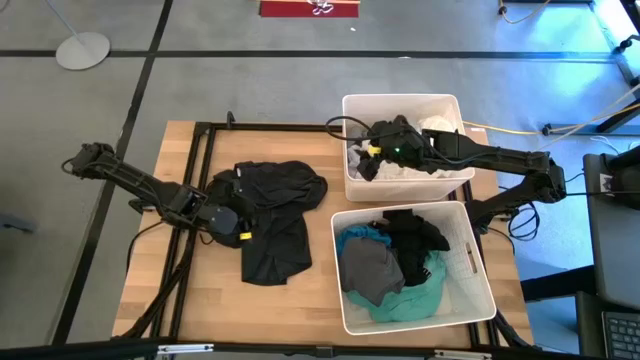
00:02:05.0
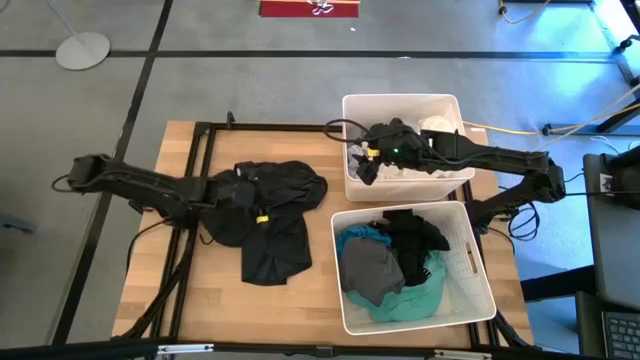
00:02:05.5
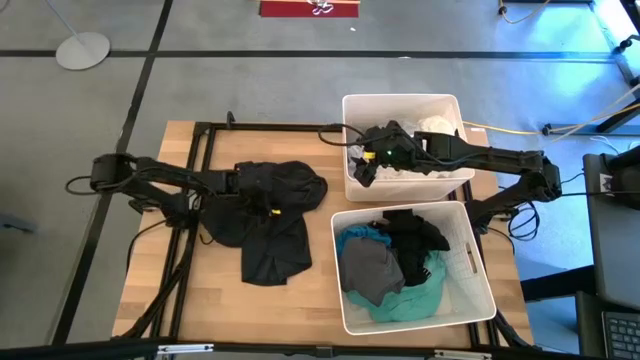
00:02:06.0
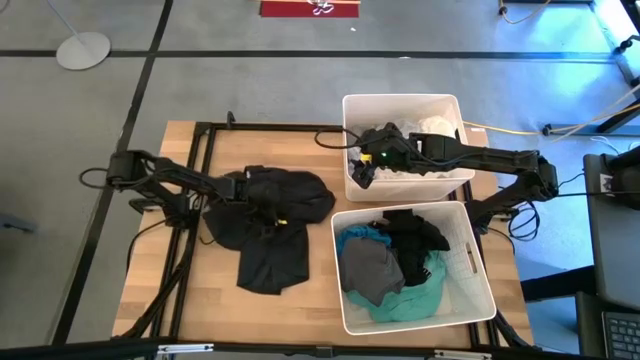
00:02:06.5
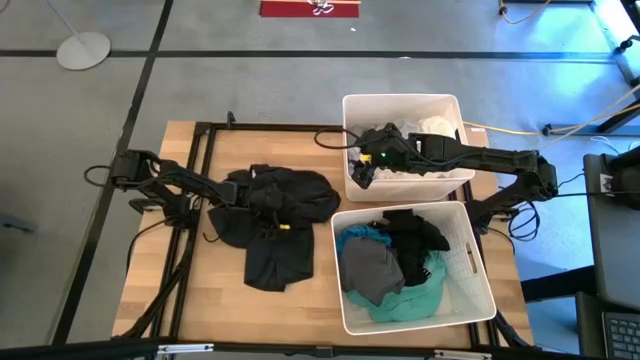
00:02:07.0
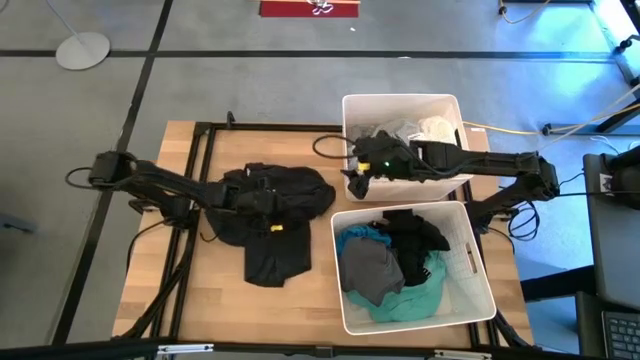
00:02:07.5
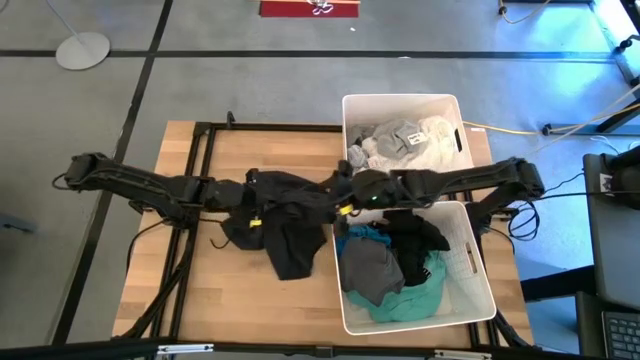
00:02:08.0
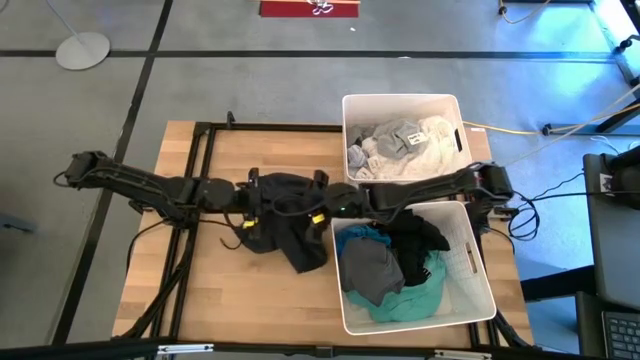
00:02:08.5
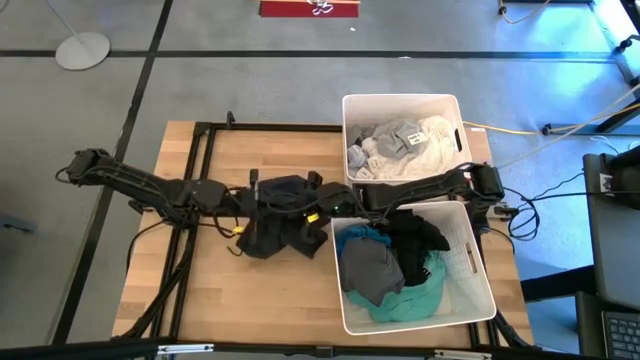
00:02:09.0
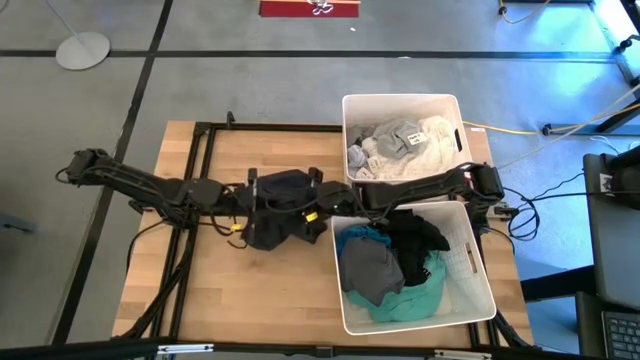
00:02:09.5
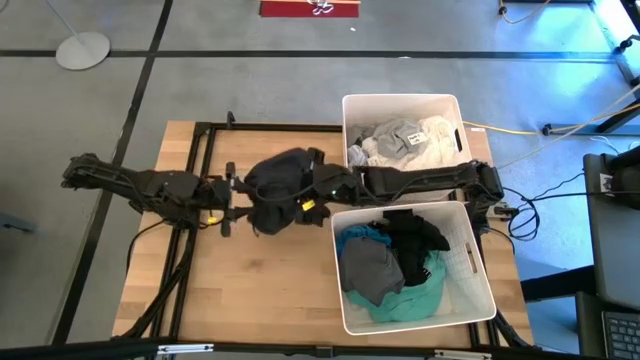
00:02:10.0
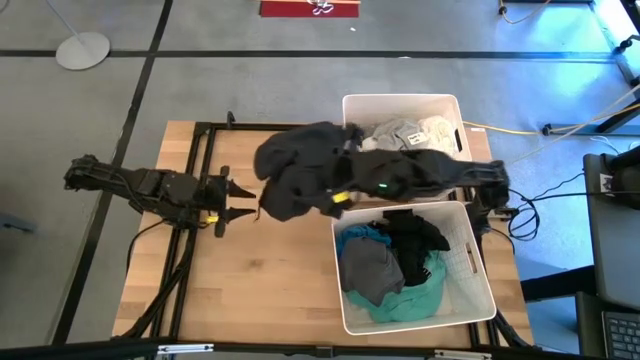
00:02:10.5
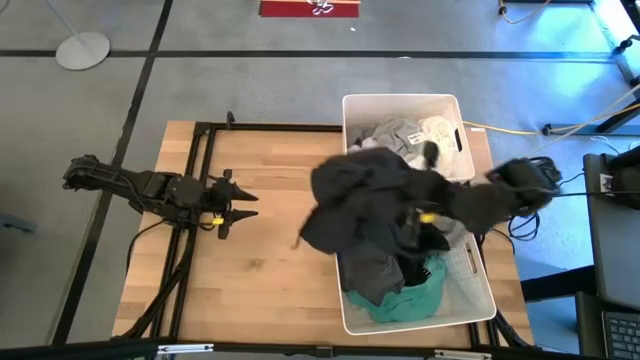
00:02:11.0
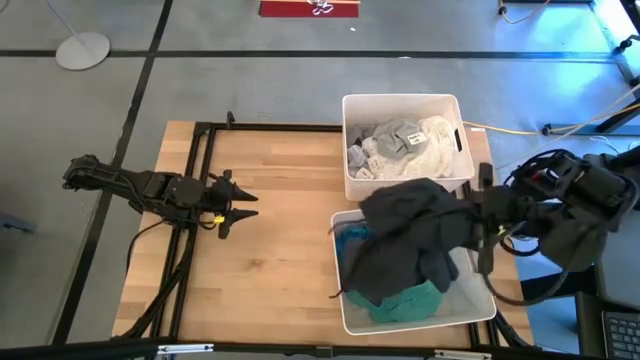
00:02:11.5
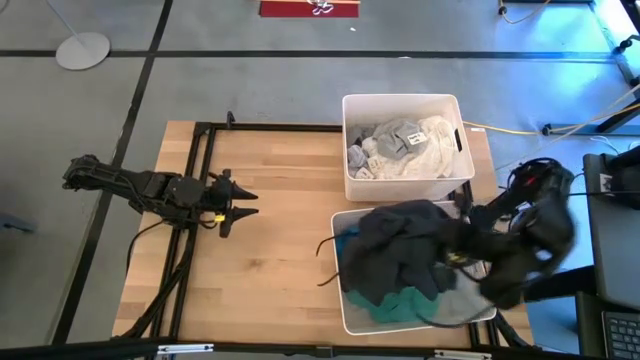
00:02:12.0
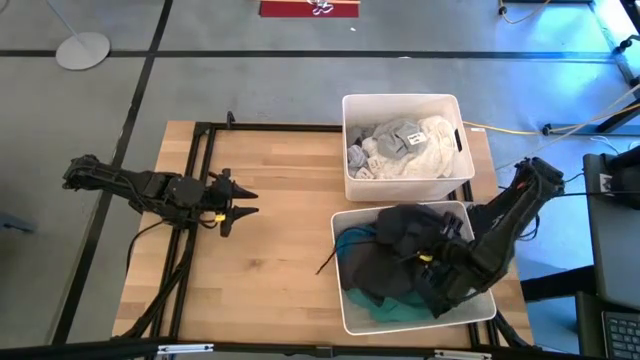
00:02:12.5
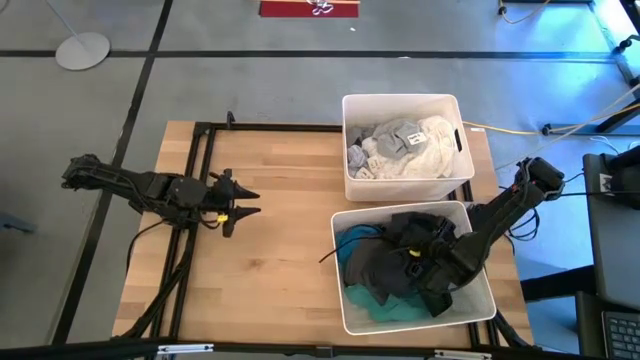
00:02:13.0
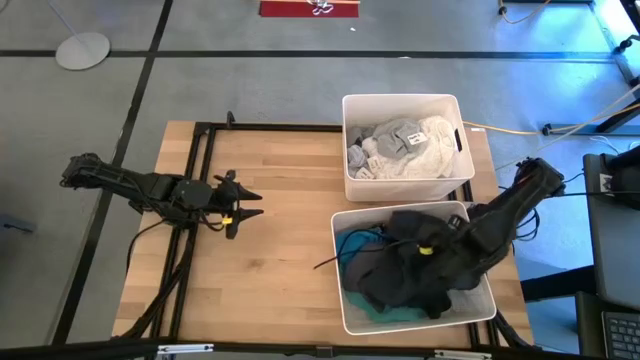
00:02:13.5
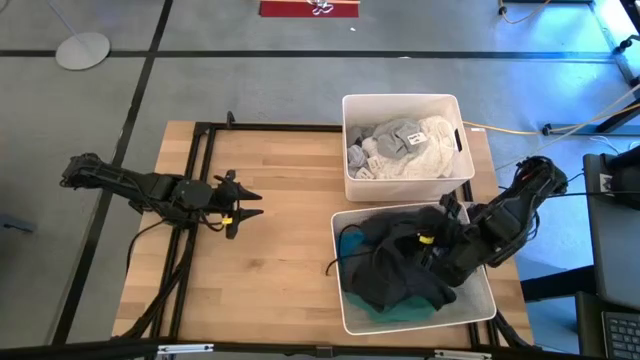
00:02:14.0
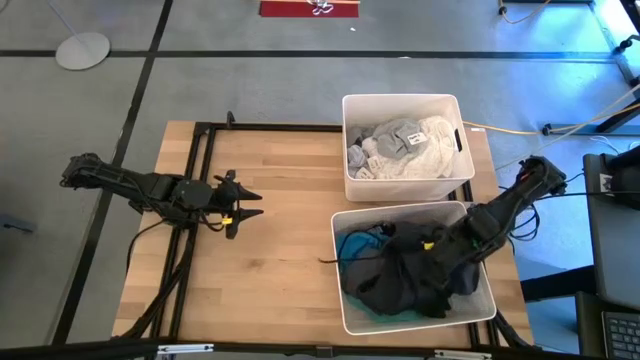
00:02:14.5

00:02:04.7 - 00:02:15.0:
Task: Sort clothes
Put the black pants into the bottom white laundry bin

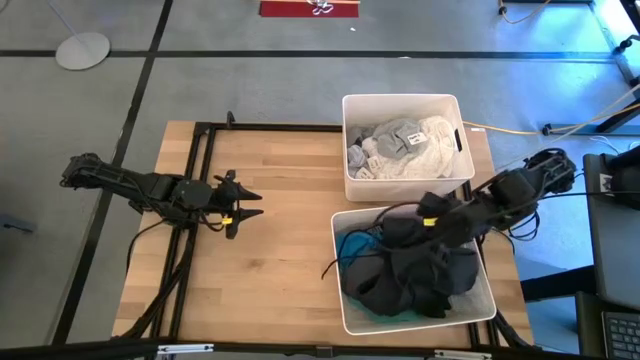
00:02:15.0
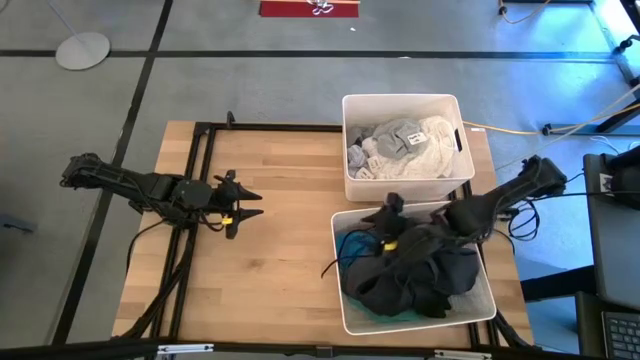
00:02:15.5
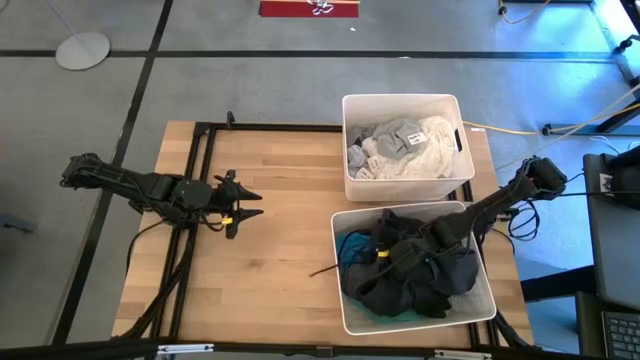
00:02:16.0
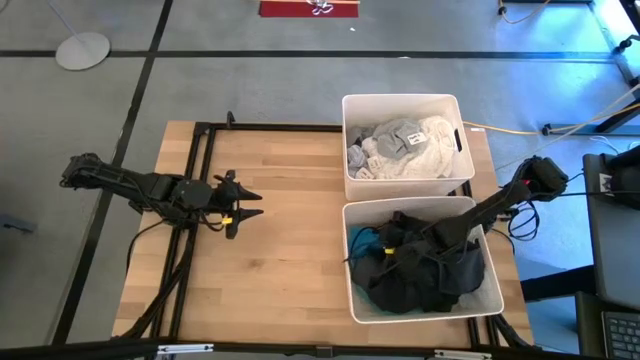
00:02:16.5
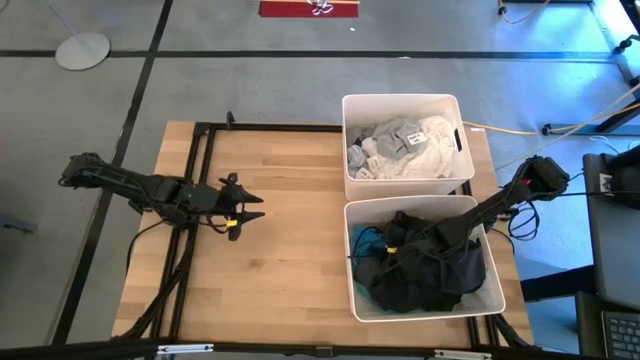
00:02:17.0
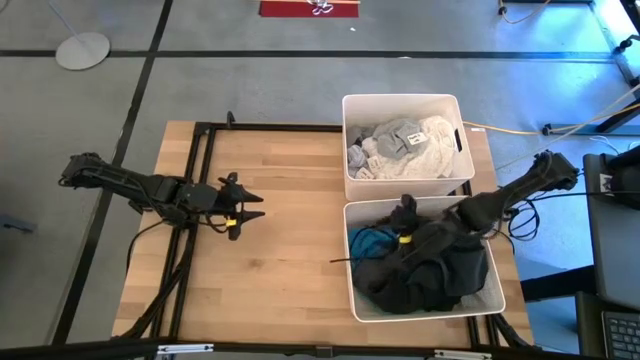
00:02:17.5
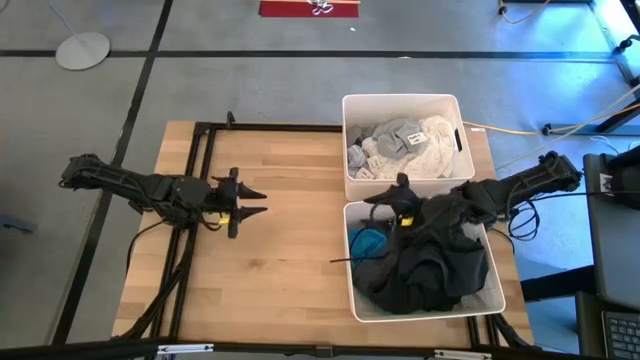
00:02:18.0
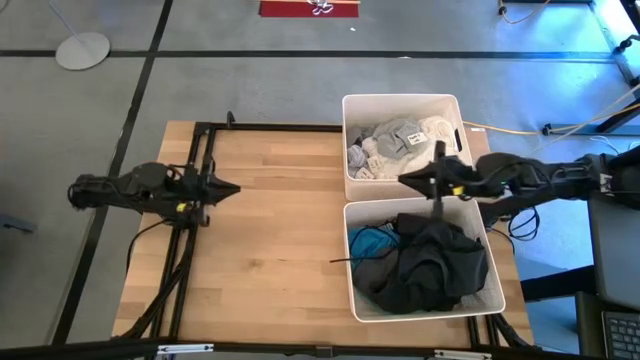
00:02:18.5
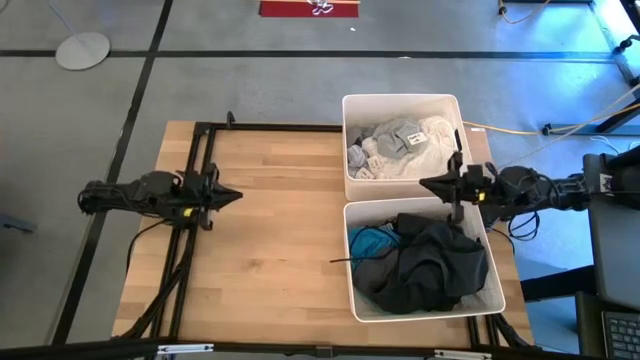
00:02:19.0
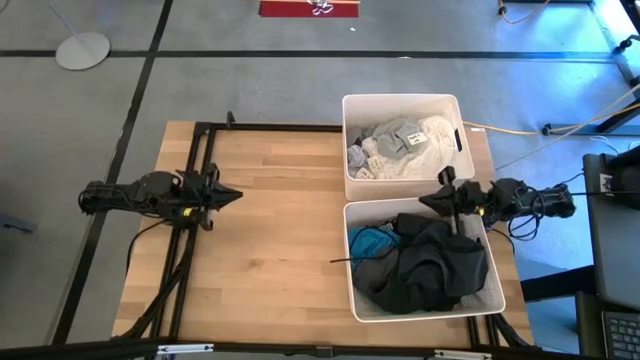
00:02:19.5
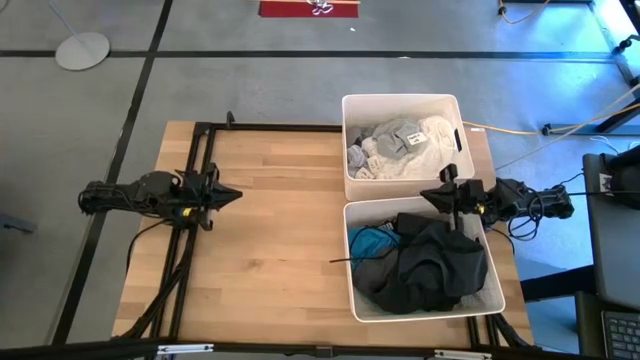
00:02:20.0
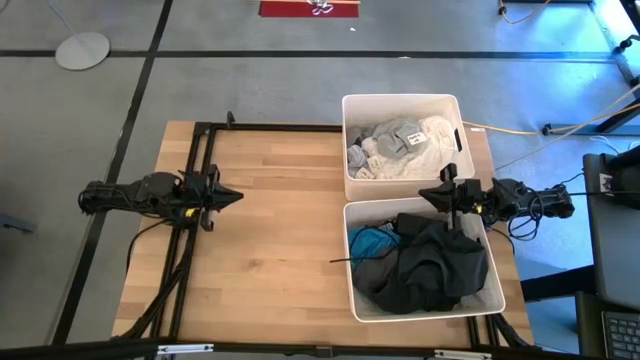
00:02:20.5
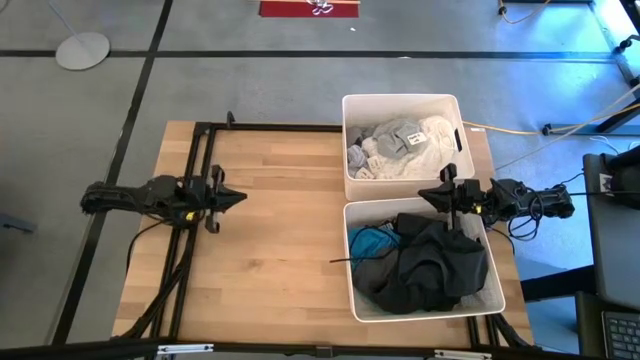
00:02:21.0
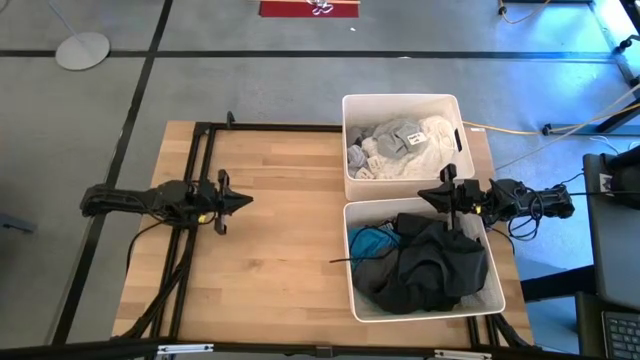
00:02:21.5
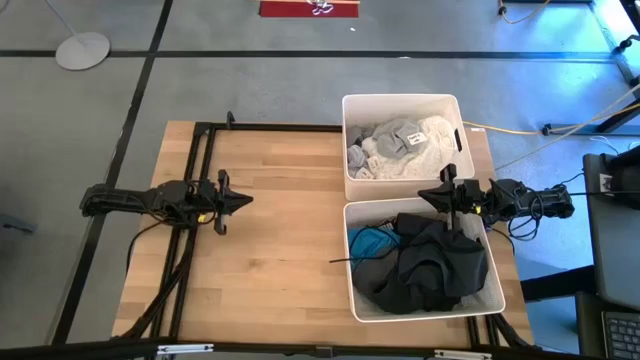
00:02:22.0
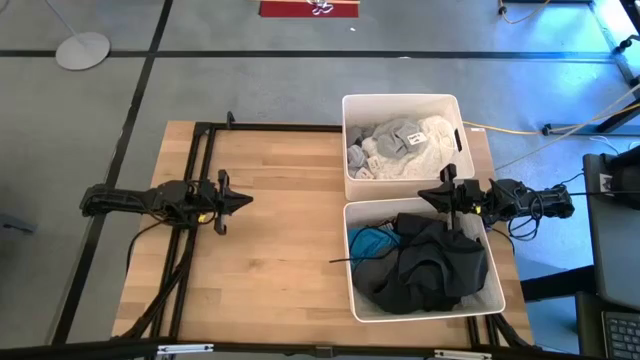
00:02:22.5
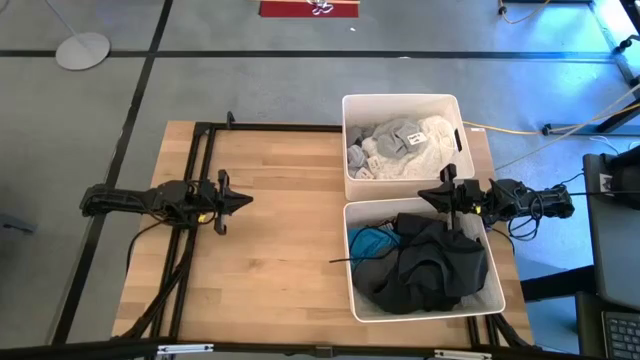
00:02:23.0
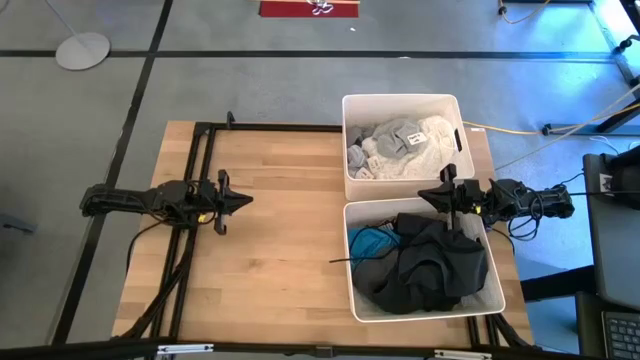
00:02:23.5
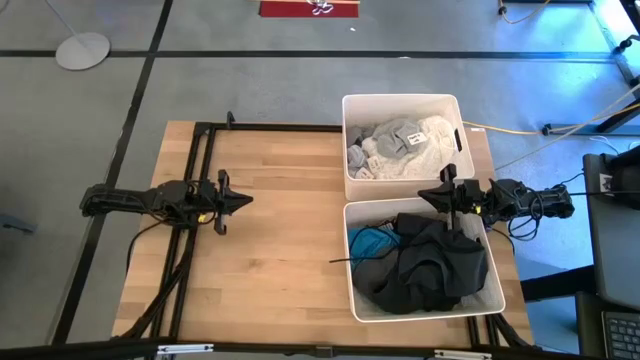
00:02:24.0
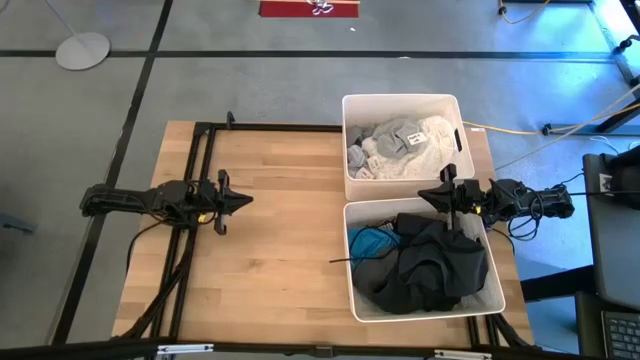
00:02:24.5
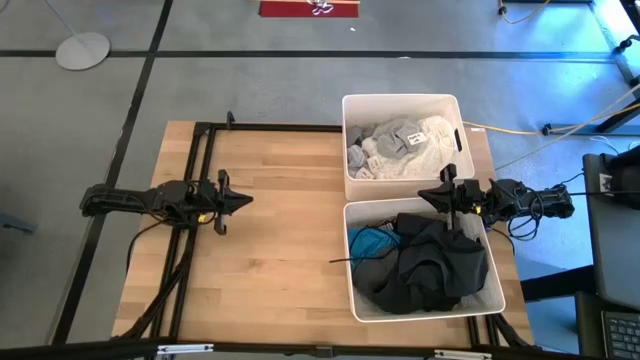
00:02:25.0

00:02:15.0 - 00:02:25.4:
Return to Home Position
